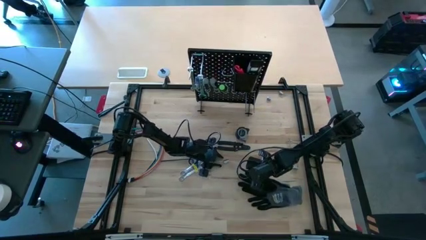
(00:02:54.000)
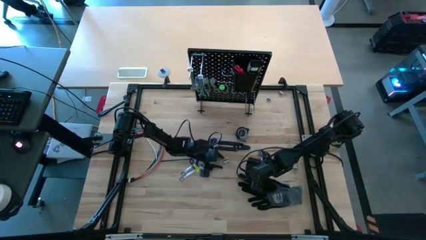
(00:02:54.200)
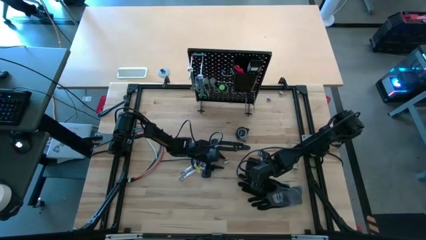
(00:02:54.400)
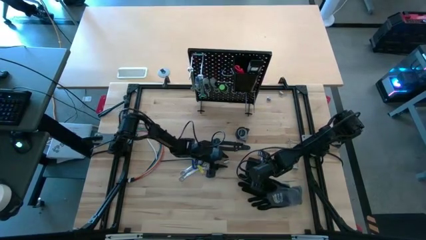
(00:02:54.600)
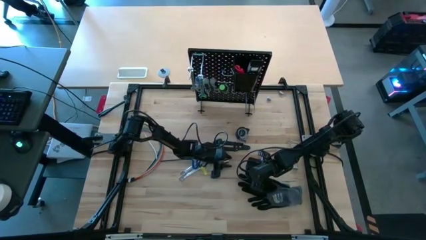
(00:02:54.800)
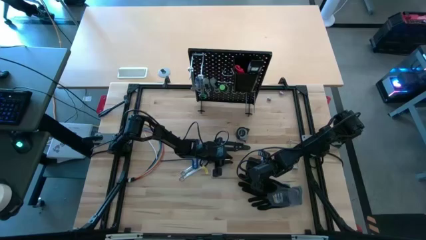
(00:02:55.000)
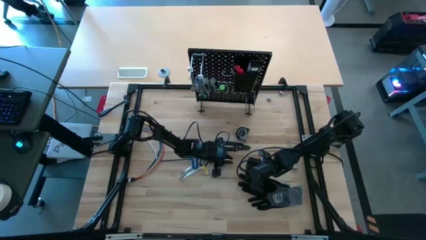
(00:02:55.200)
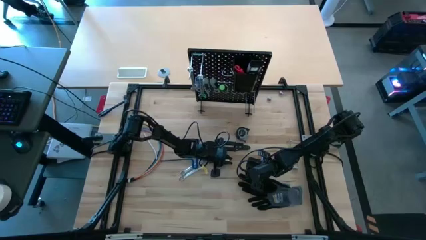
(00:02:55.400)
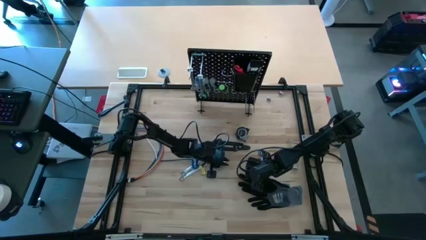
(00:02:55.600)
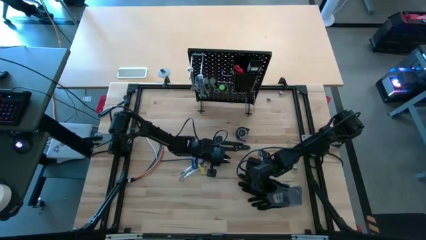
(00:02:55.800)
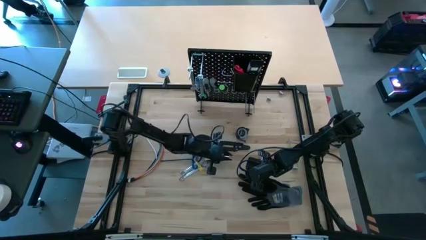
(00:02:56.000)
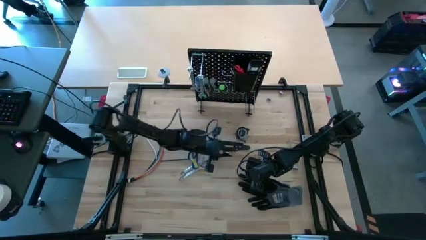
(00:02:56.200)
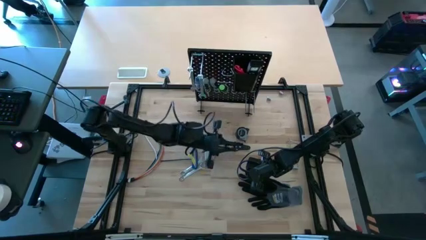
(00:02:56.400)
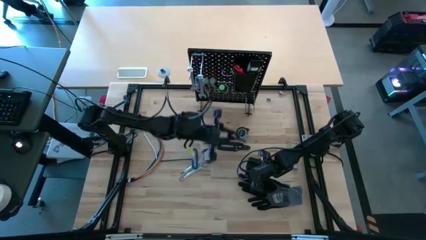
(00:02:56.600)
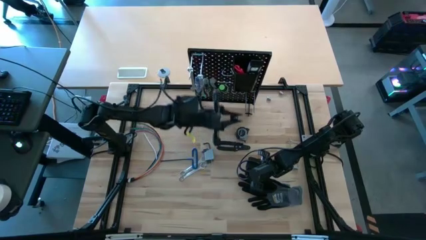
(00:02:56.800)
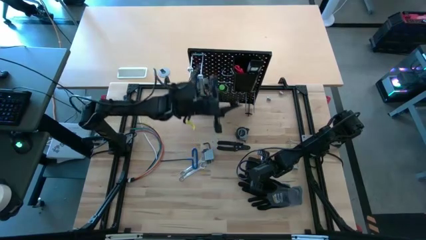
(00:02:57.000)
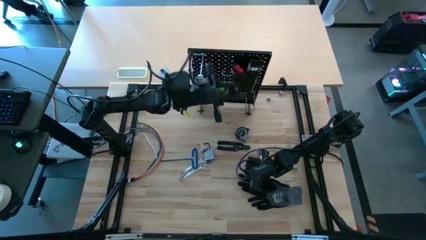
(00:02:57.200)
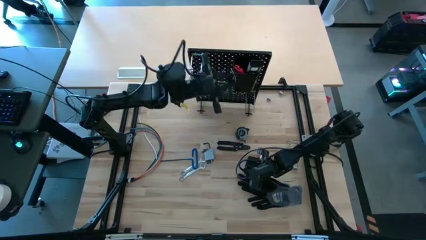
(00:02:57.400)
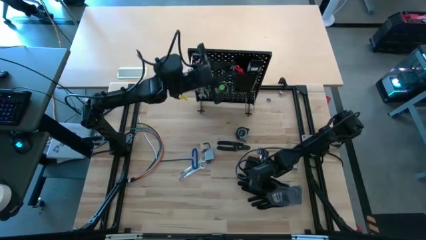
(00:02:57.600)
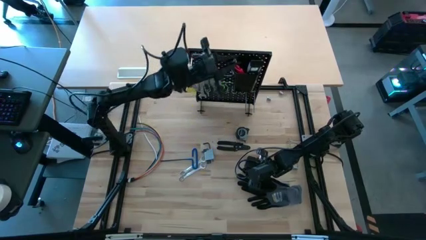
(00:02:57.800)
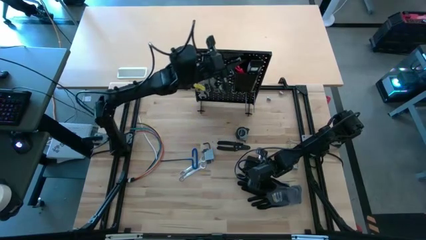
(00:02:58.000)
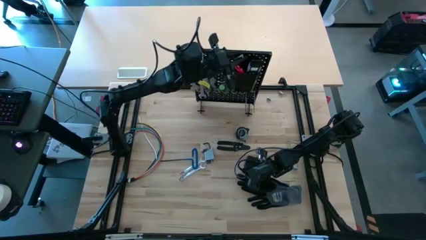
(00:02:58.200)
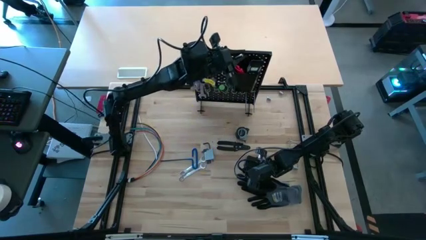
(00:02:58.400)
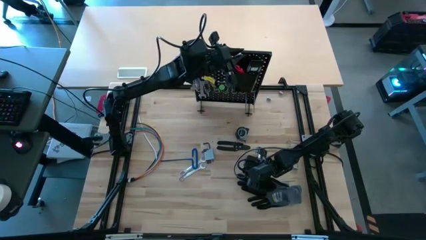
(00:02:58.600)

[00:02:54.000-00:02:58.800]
Task: Hang tools onto peg board
Put the socket into the black bin on the peg board

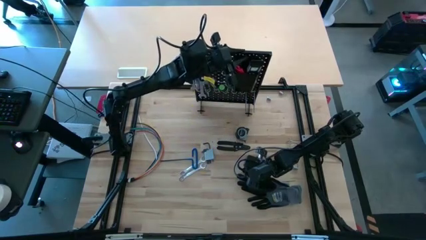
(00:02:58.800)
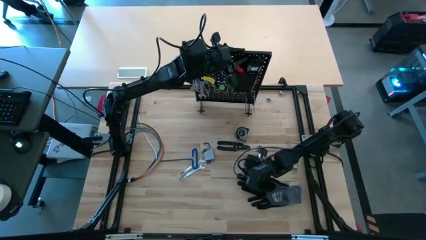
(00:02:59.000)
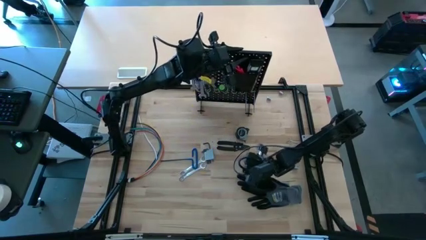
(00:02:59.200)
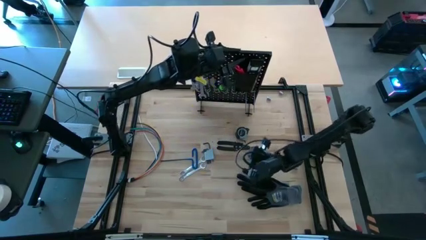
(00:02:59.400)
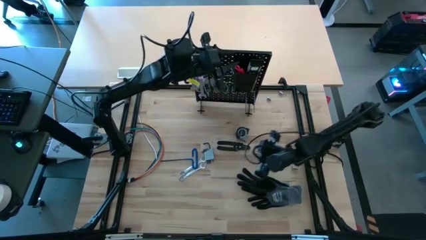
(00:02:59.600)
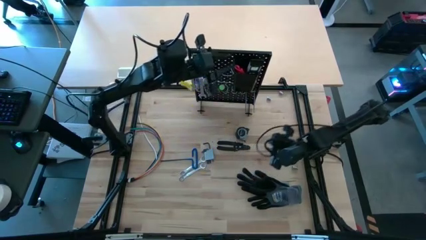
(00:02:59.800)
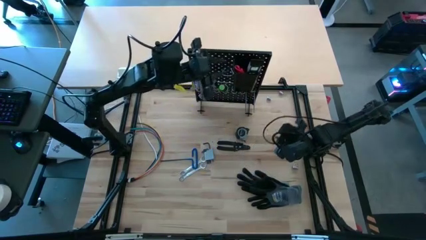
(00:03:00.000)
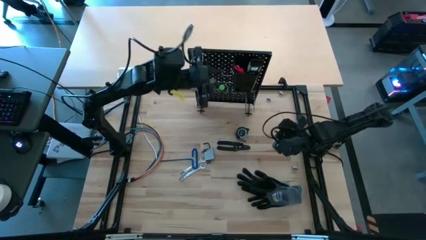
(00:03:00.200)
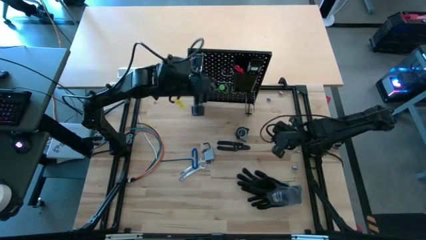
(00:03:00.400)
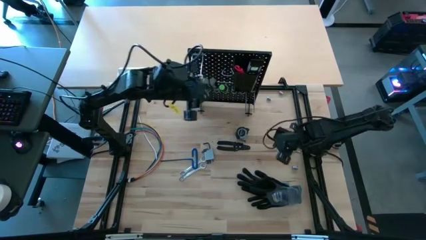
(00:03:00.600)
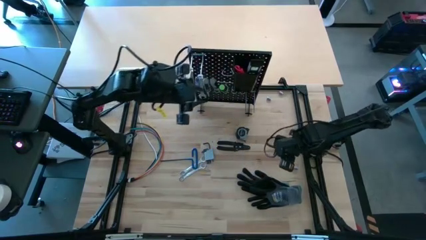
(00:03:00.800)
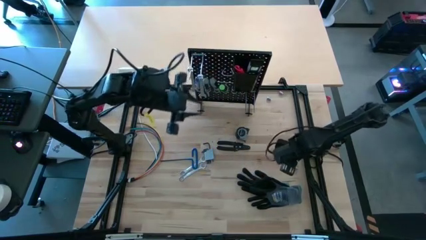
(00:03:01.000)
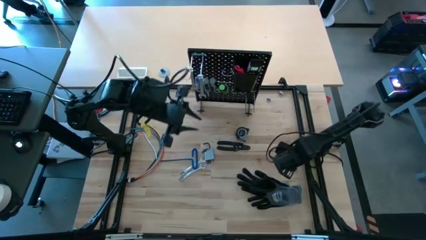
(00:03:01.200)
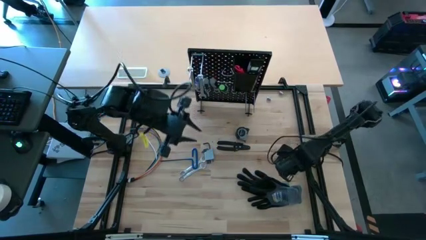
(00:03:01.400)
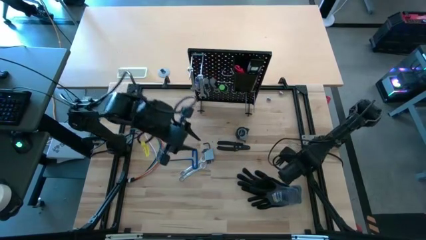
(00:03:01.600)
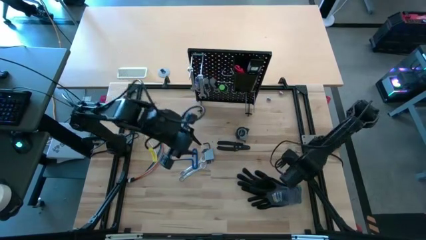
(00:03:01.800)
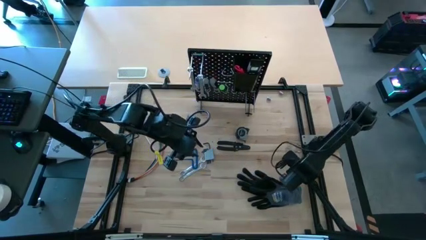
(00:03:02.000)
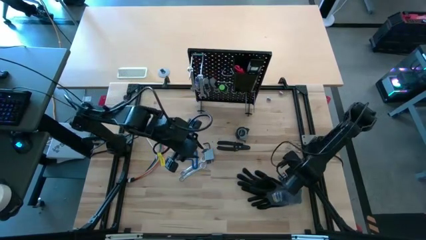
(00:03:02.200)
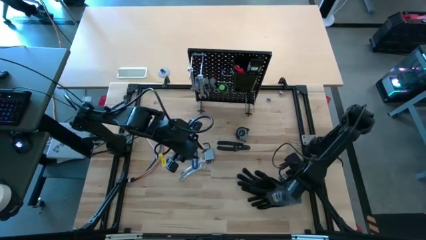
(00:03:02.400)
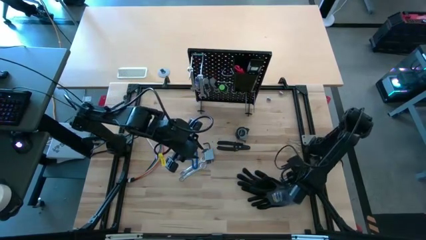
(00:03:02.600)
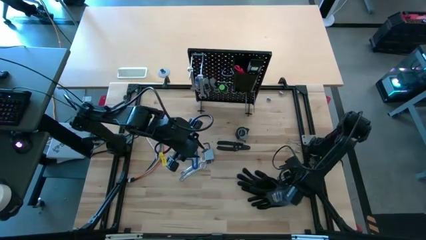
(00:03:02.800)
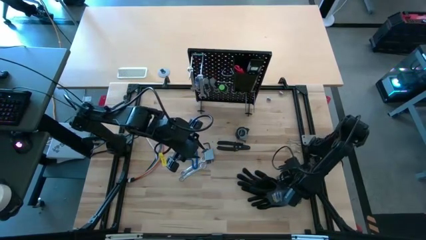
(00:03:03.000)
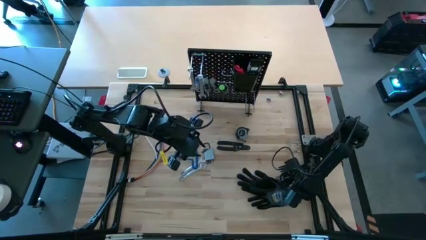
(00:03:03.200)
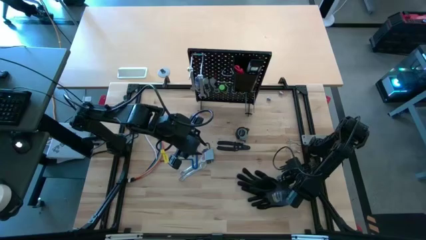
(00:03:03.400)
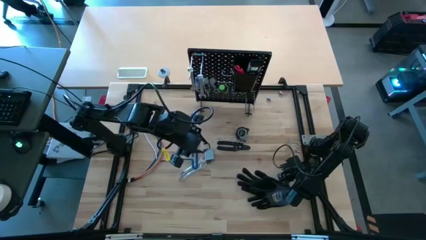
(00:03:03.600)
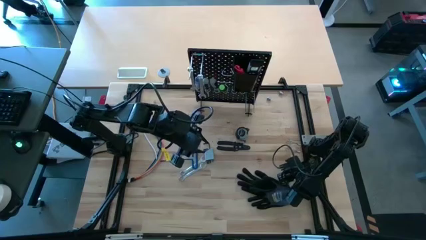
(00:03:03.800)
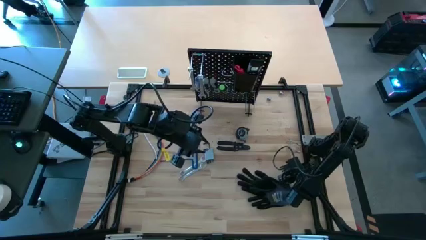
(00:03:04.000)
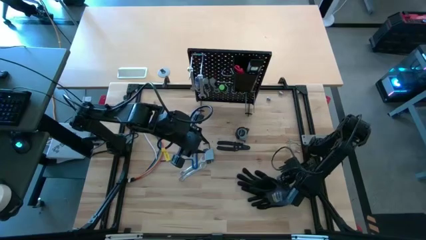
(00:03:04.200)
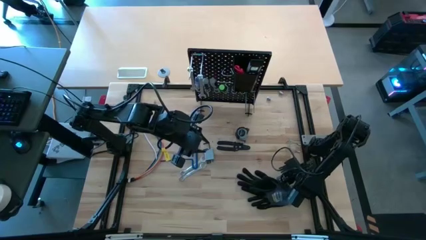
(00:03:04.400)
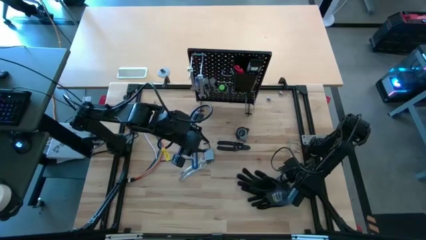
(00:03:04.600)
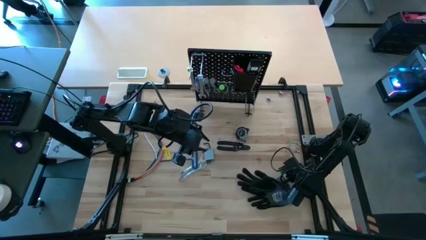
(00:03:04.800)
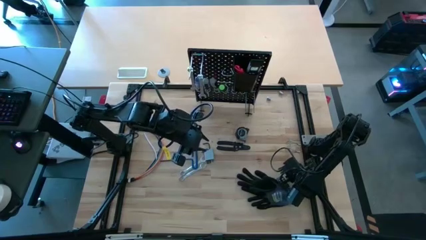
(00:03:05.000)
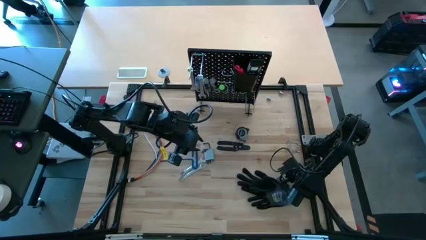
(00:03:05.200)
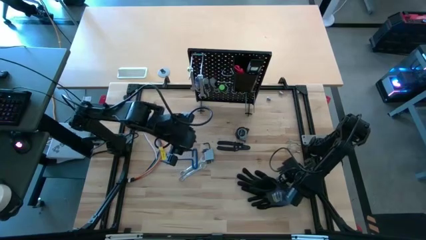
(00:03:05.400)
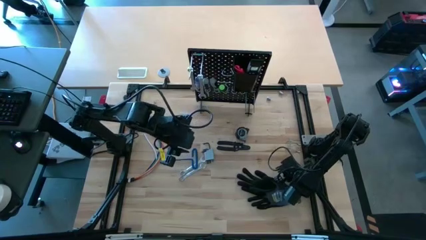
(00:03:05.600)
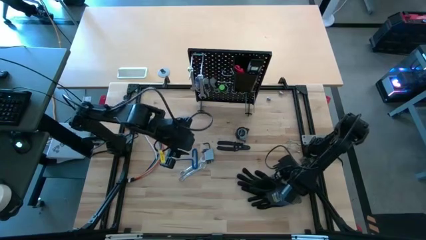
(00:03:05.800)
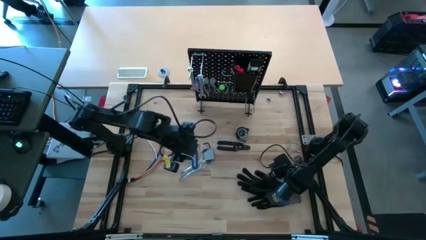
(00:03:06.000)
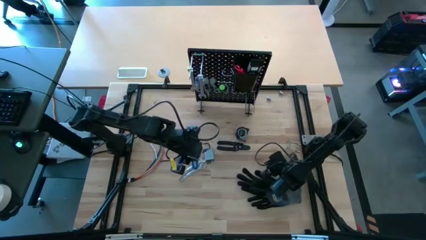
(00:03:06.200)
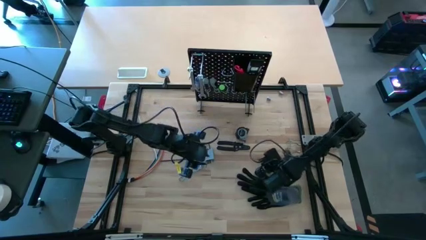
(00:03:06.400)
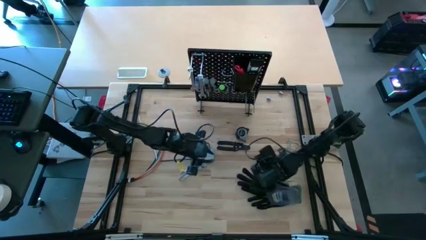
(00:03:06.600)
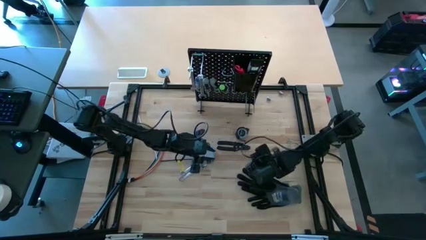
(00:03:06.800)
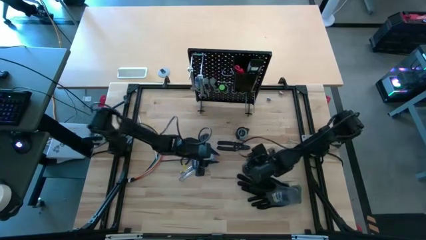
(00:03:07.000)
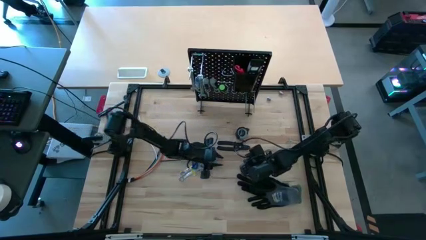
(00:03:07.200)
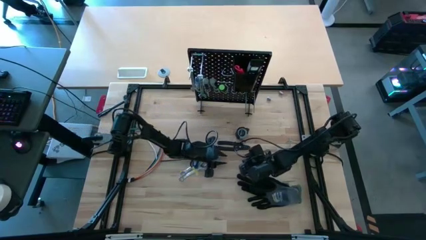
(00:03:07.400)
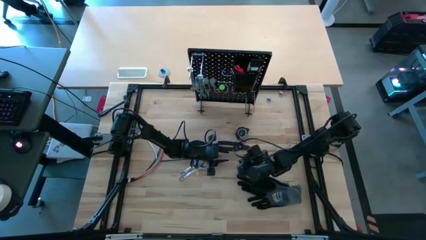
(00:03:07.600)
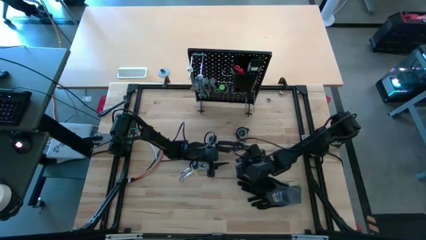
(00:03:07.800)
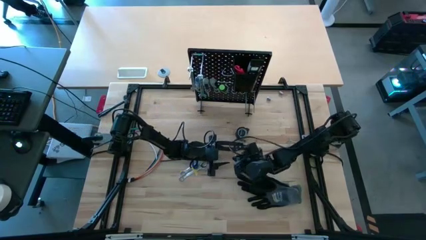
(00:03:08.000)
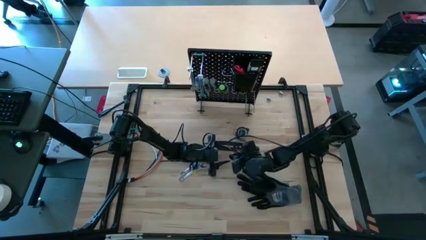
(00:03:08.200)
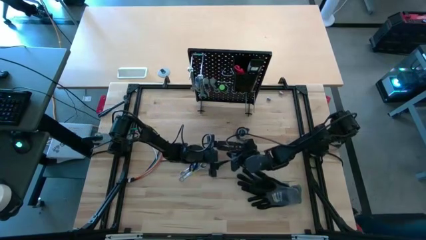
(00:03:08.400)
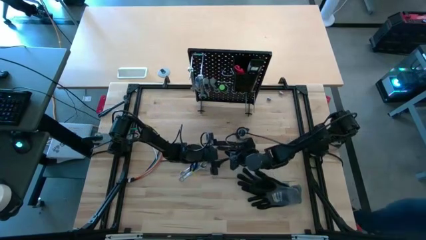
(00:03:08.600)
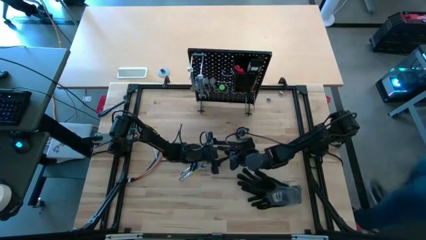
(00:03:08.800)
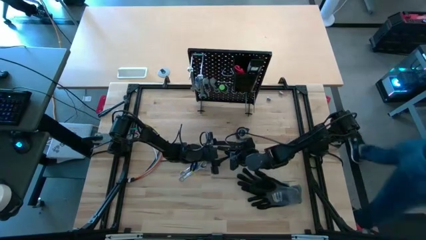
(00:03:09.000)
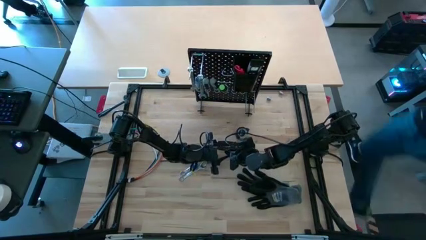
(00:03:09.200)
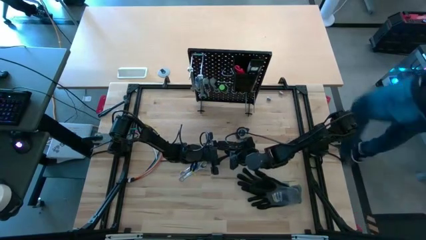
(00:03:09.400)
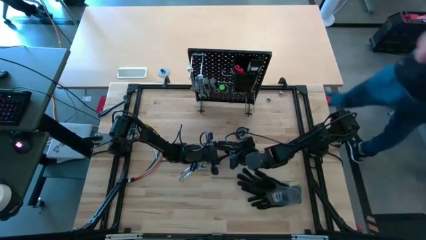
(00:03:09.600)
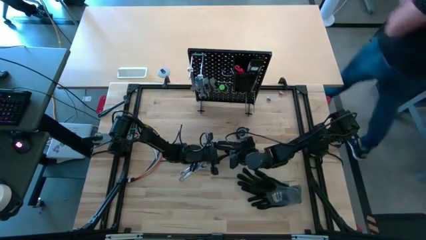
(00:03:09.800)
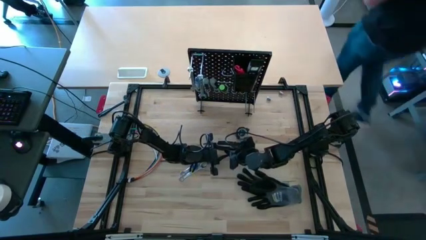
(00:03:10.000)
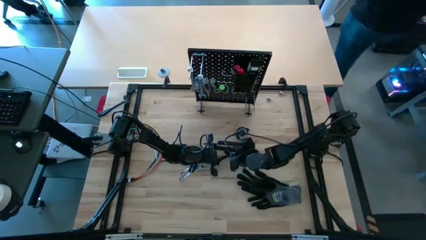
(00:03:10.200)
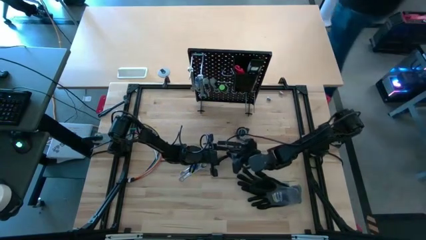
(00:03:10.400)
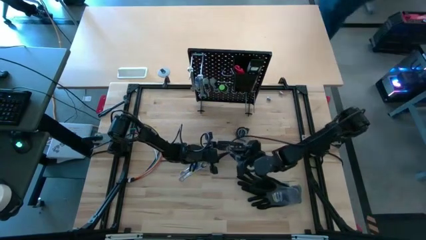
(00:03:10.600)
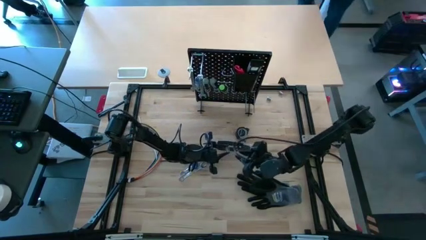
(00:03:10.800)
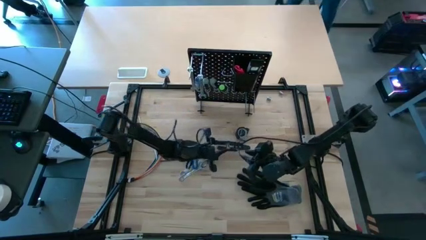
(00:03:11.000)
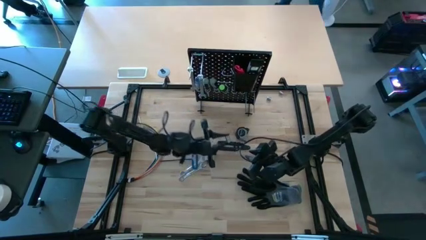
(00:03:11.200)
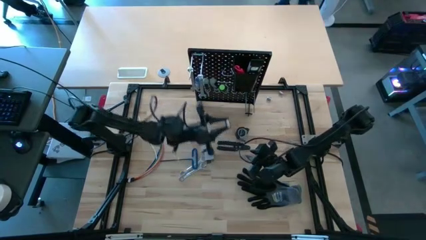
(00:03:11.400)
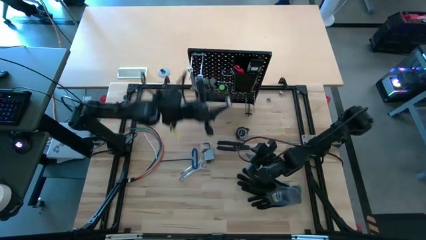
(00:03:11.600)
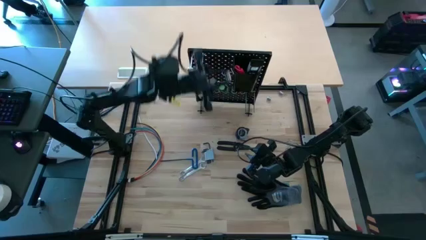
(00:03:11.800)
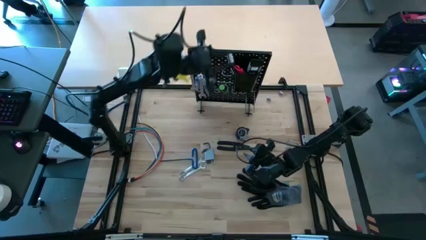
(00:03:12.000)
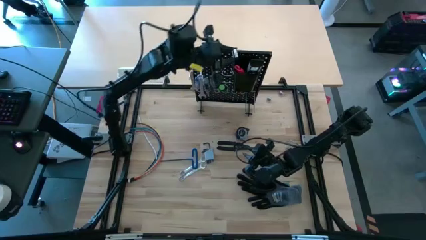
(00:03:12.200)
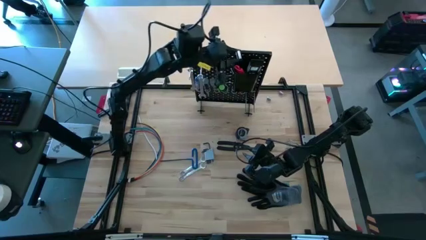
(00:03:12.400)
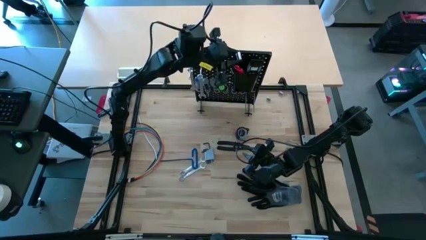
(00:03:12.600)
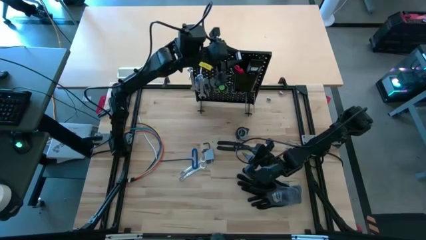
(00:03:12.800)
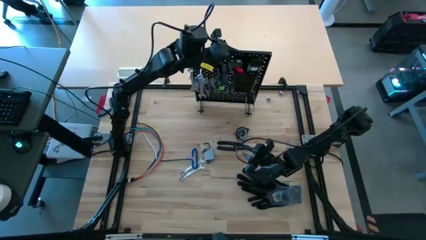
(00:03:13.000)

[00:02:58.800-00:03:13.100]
Put the socket into the black bin on the peg board
